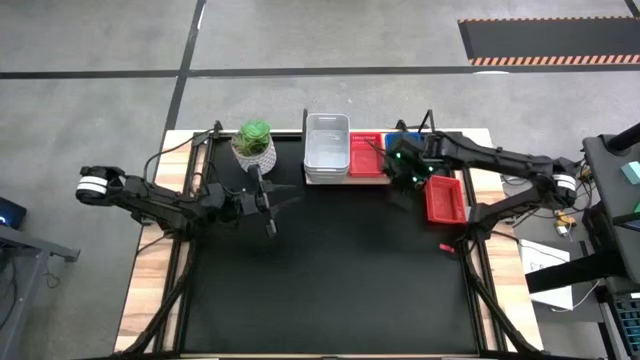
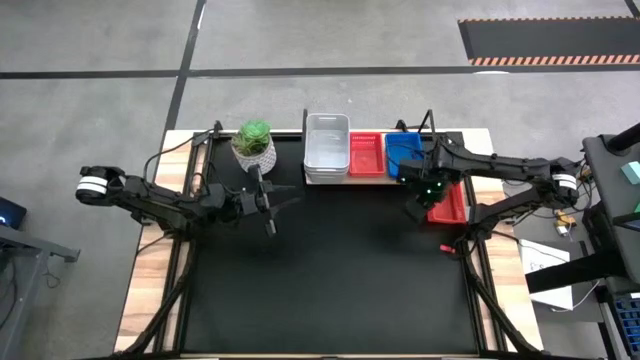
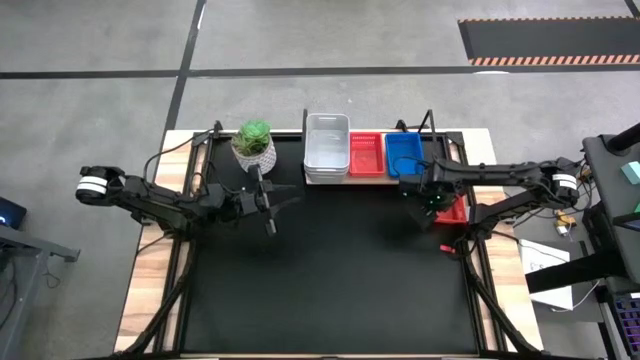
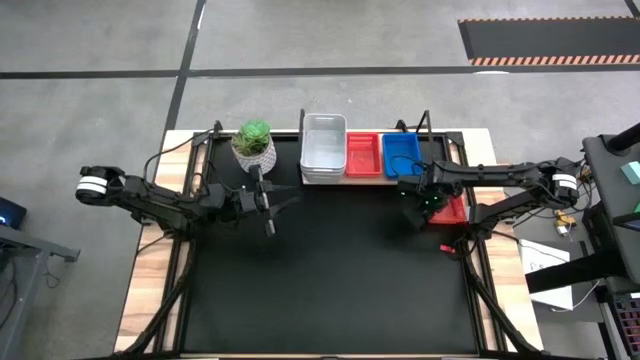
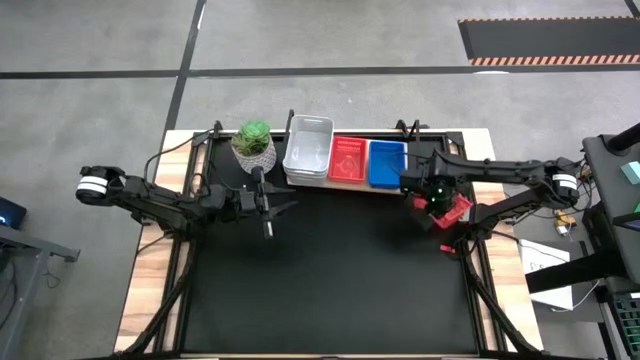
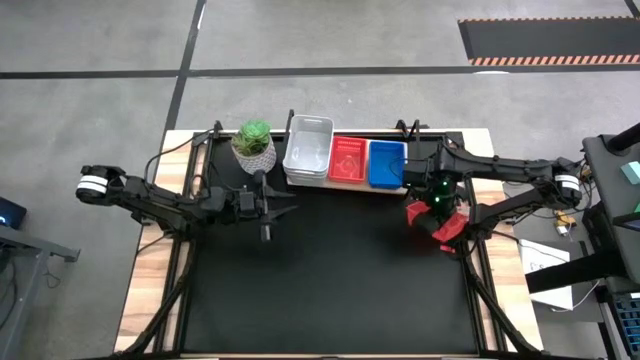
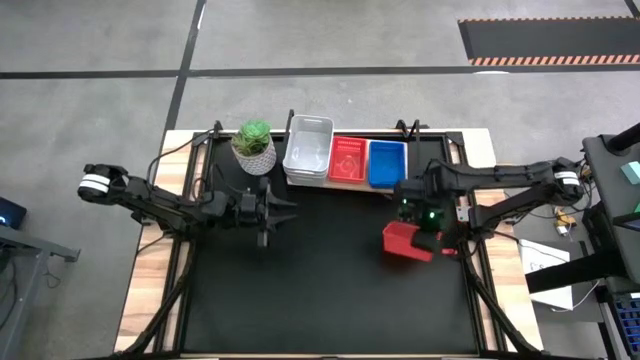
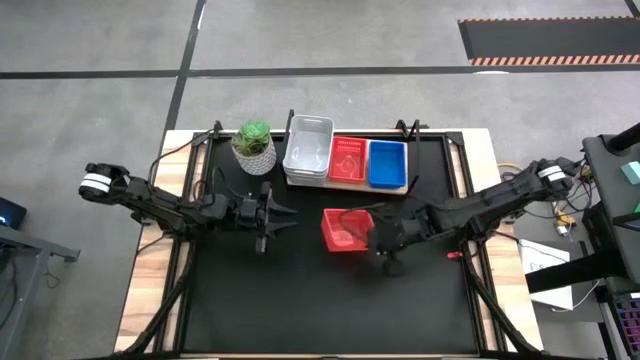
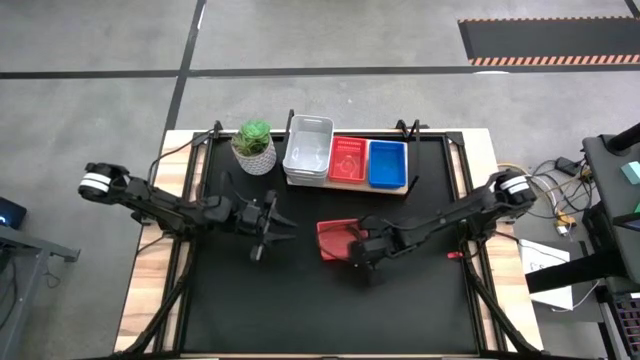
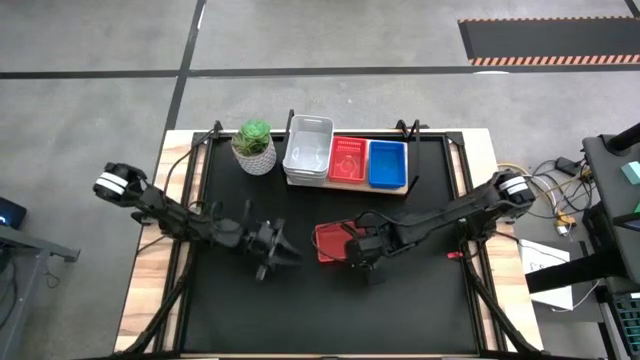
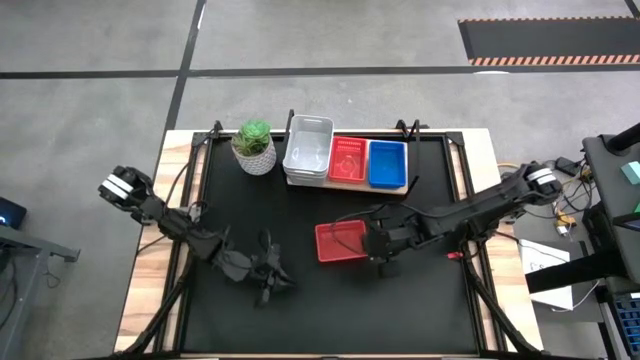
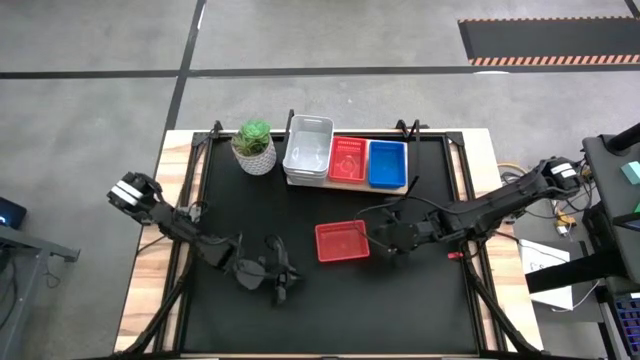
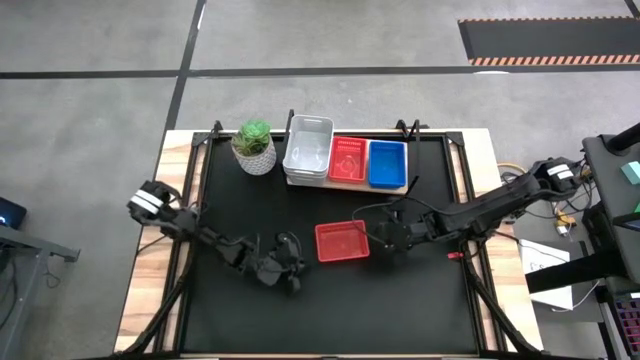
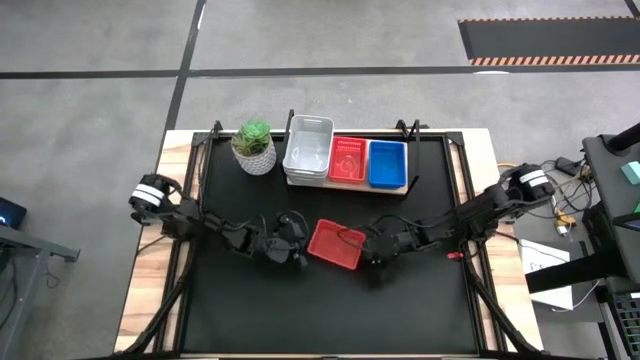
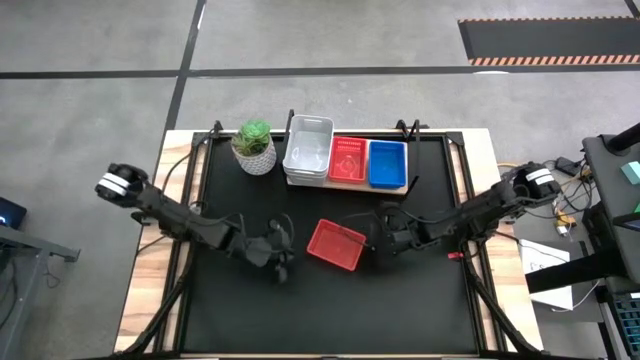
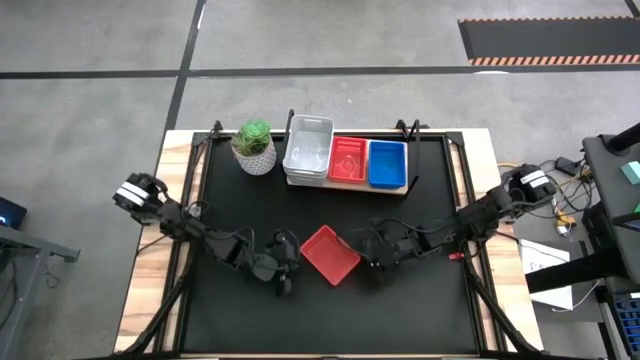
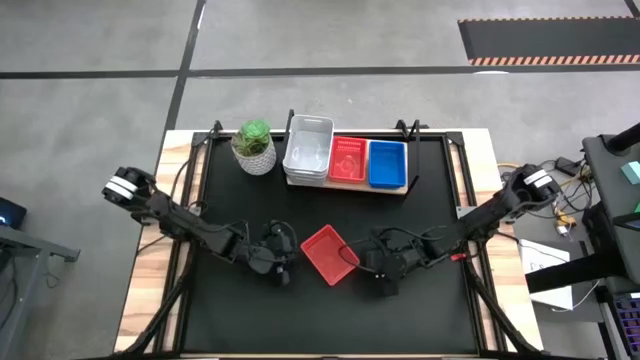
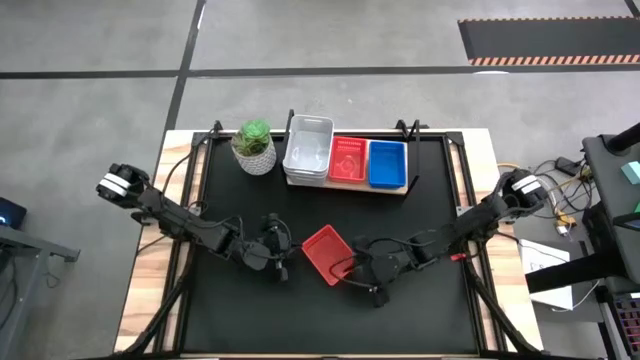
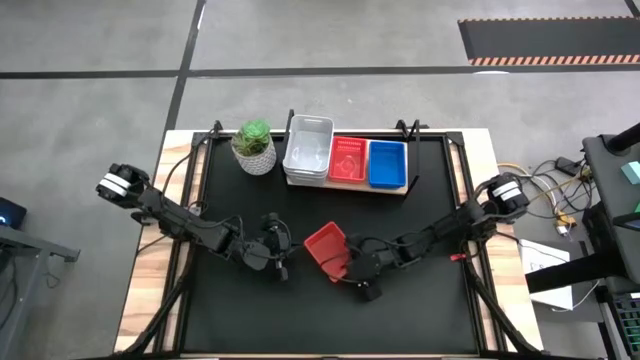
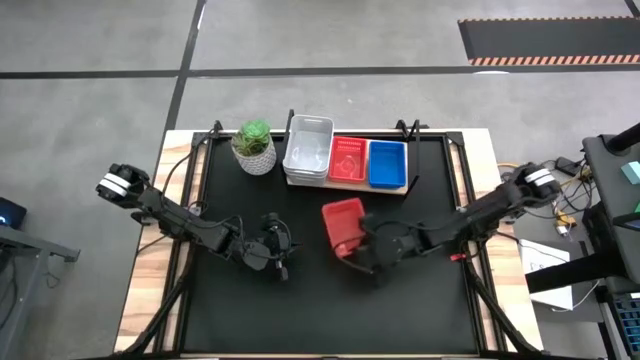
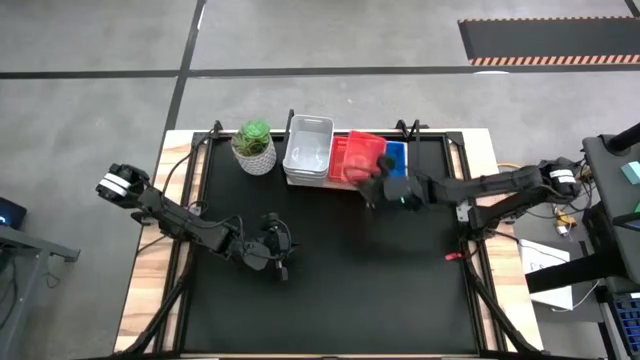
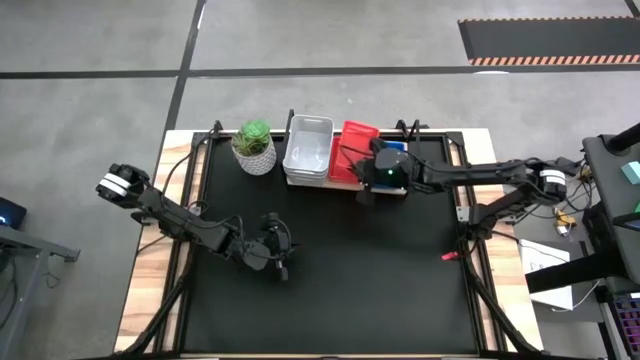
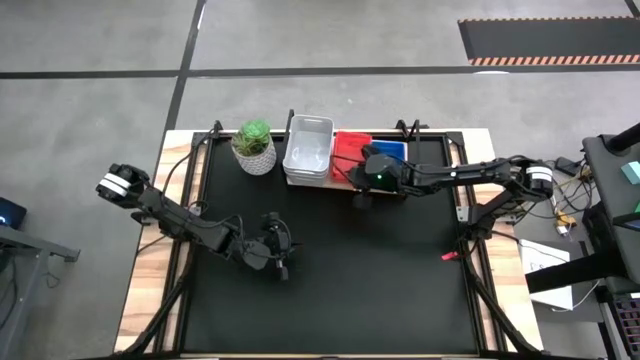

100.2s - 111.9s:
Task: Stack baskets on shelf by color
Stack the red bin on the red bin on the shelf

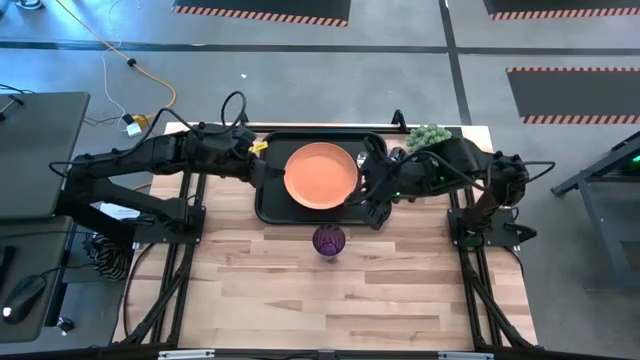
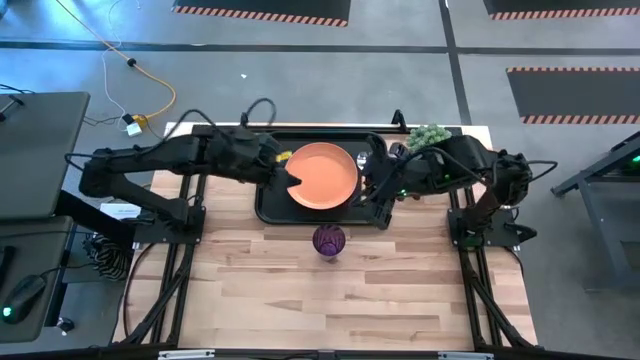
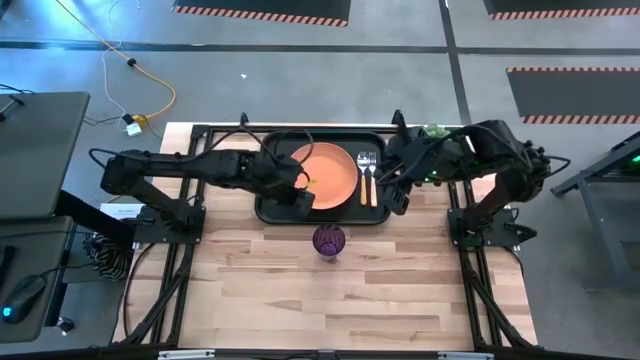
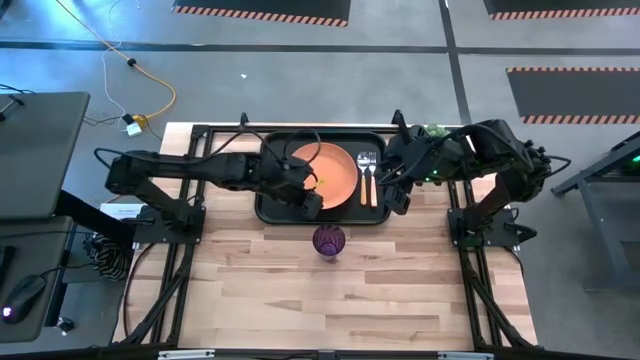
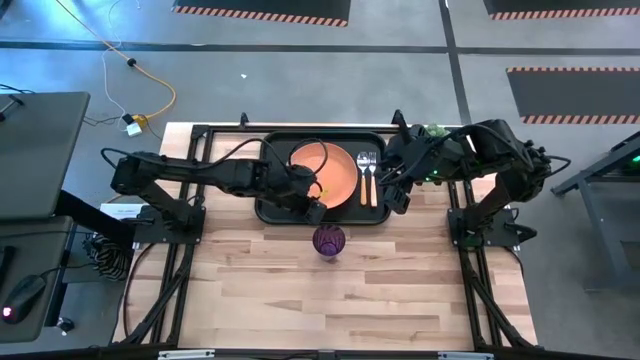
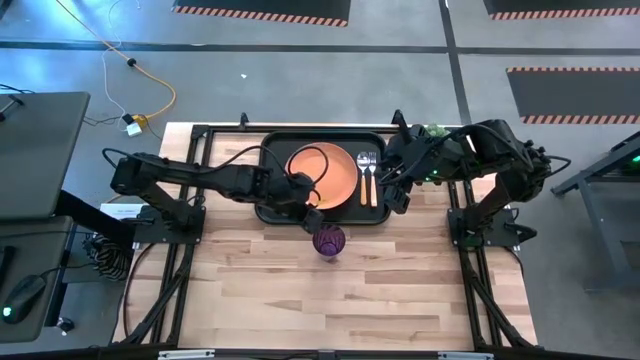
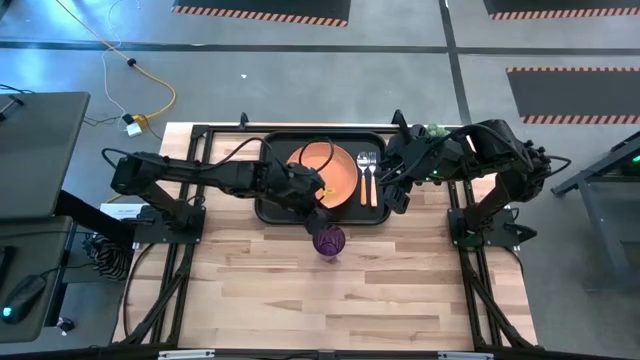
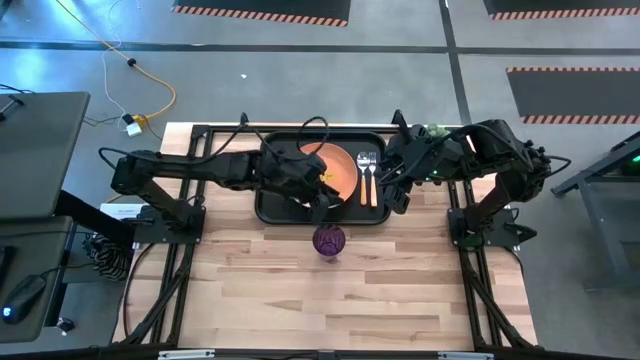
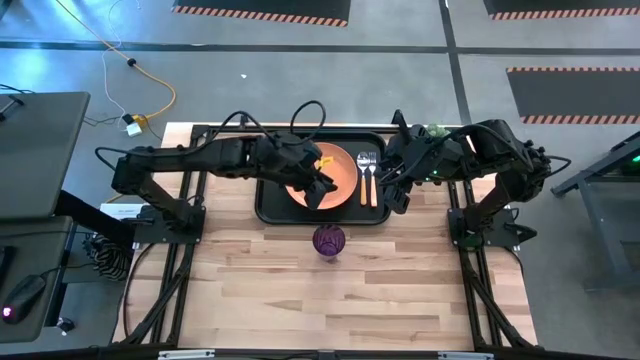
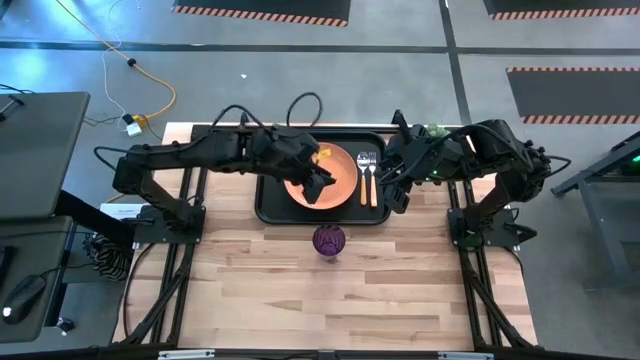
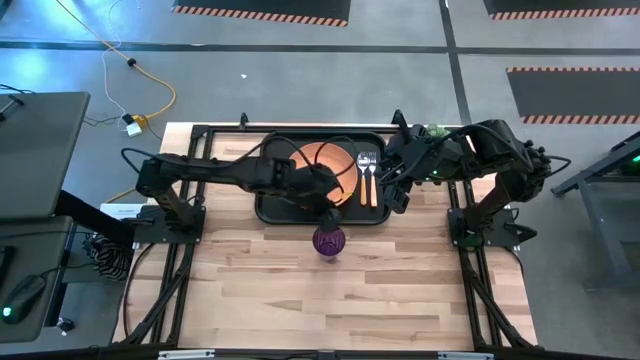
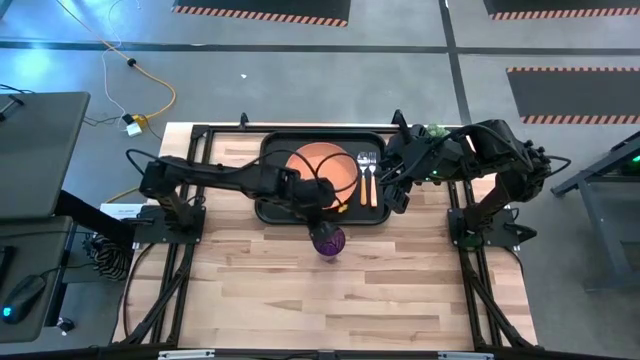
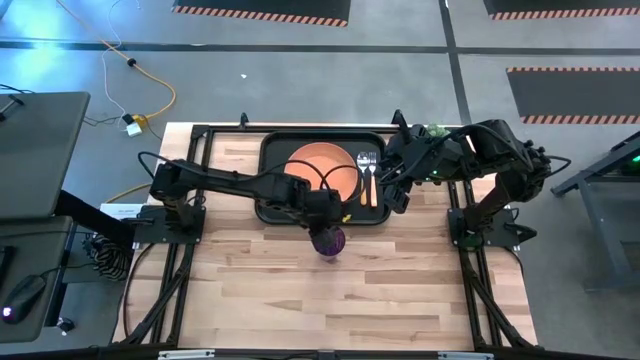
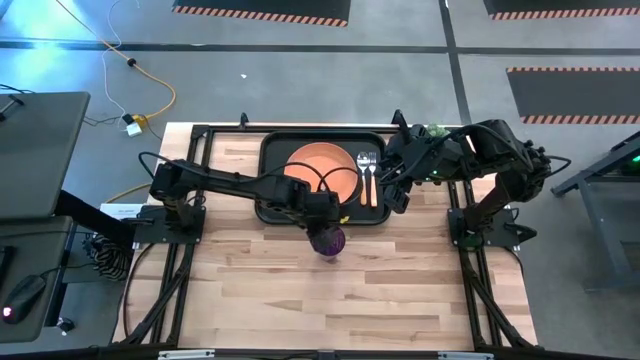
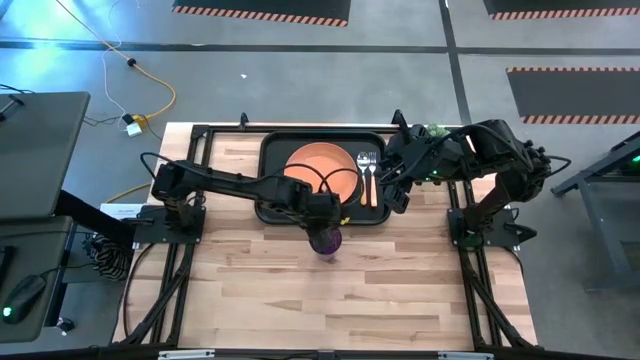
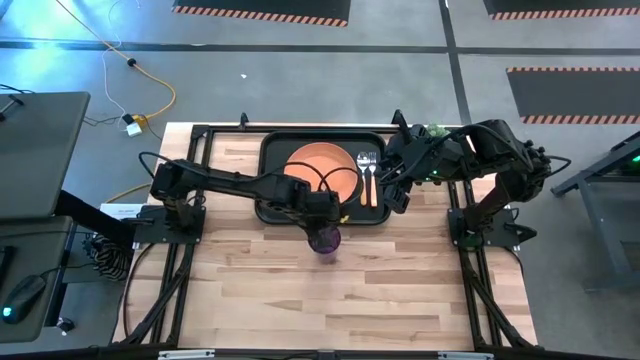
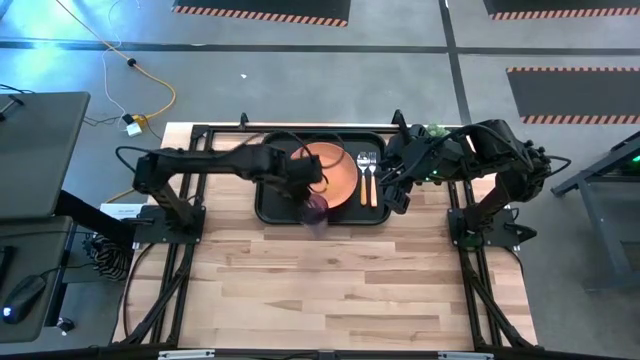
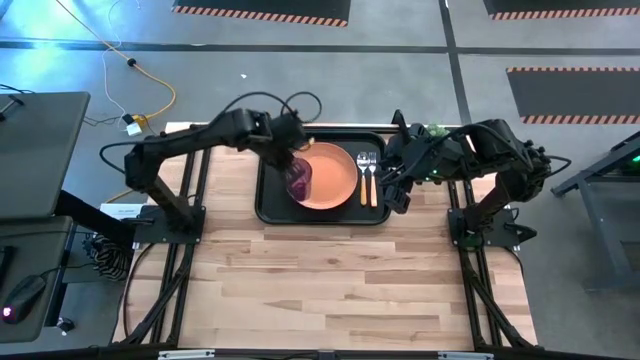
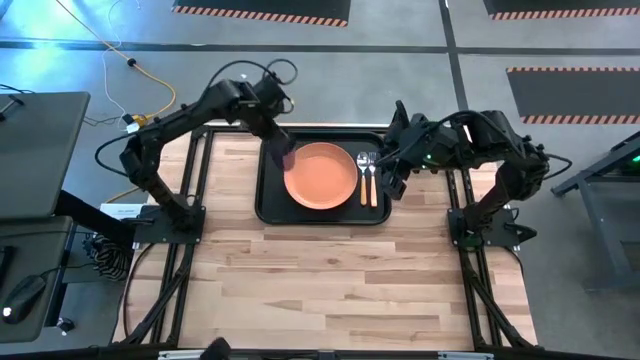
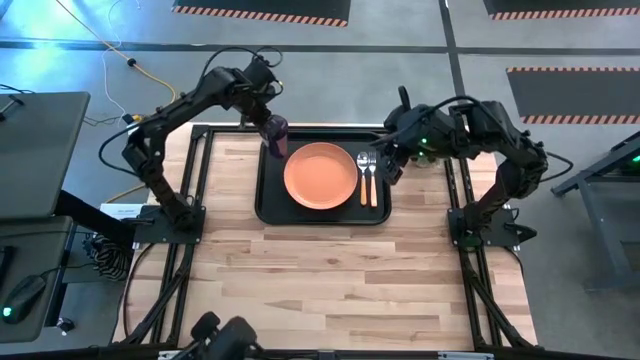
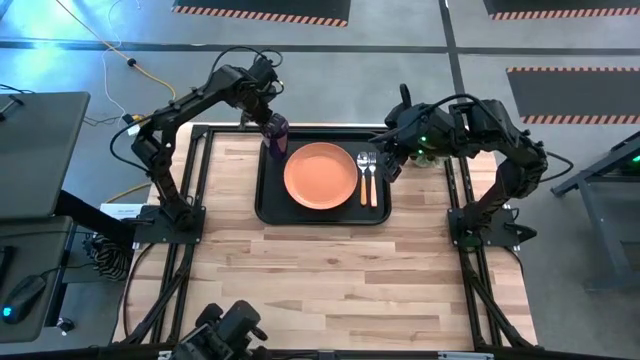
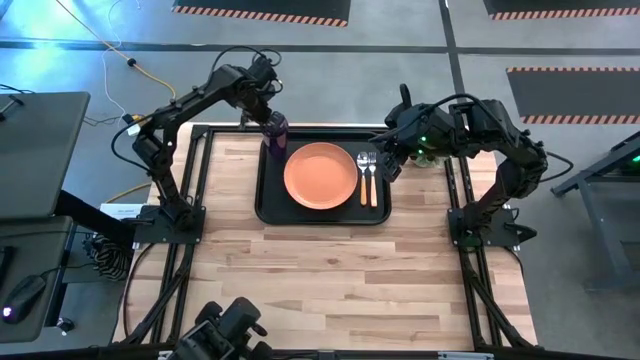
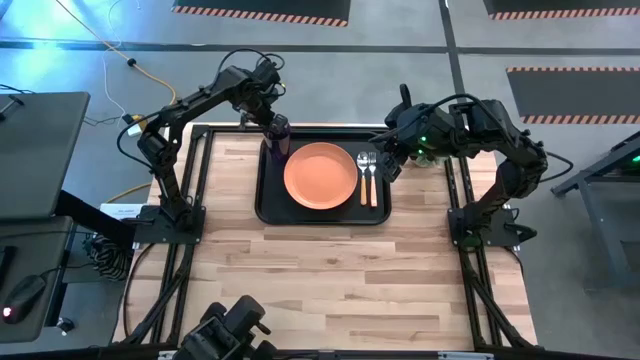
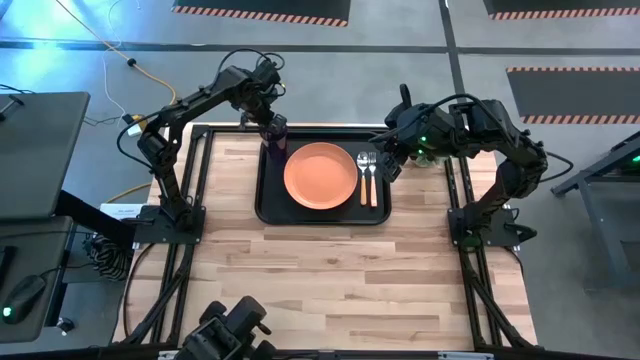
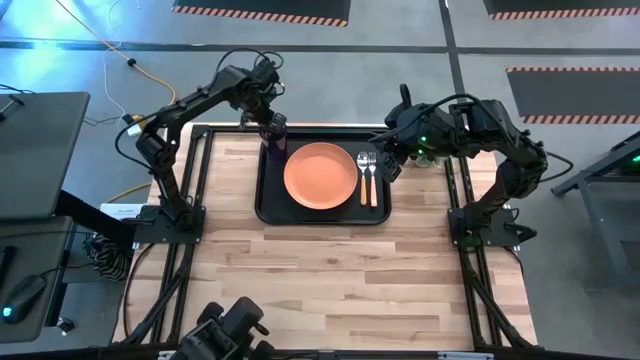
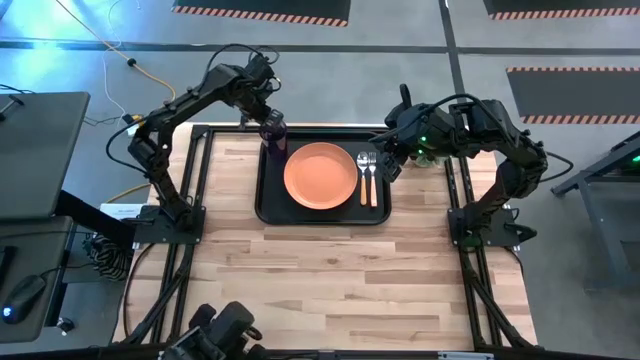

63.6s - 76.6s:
Task: Pick and place plate/cup/fork/spoon on tray
Put the purple glass on the black serving tray to the top left of the orange plate
